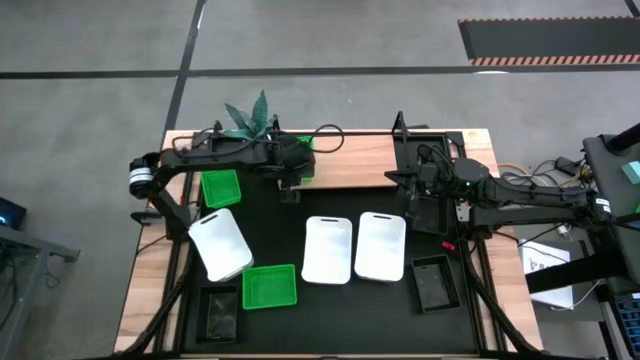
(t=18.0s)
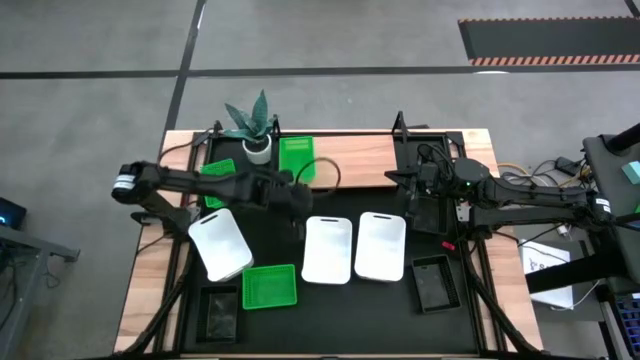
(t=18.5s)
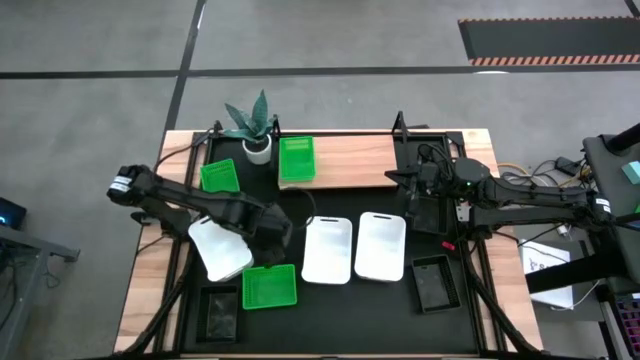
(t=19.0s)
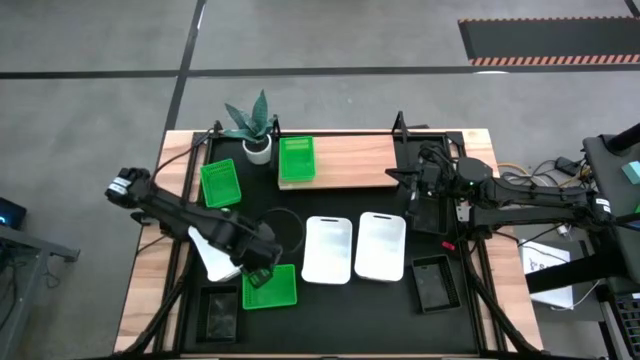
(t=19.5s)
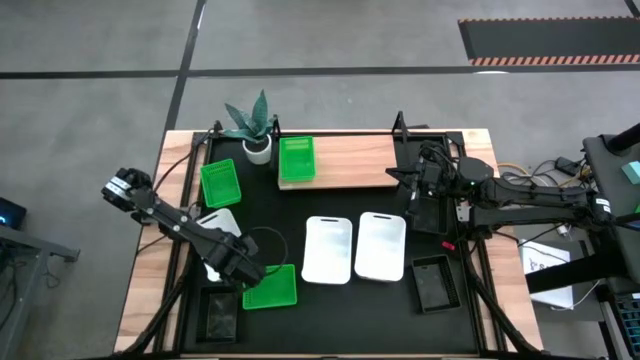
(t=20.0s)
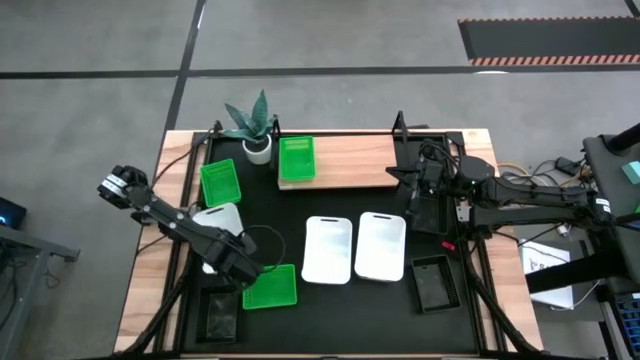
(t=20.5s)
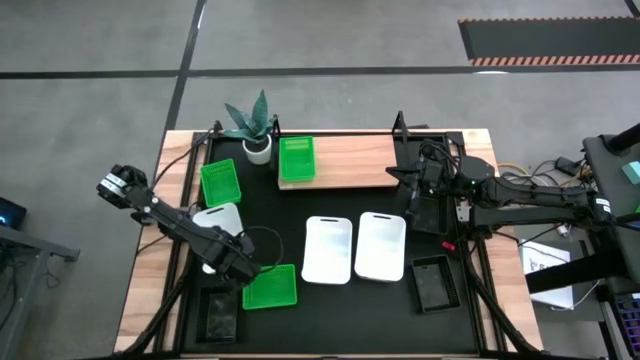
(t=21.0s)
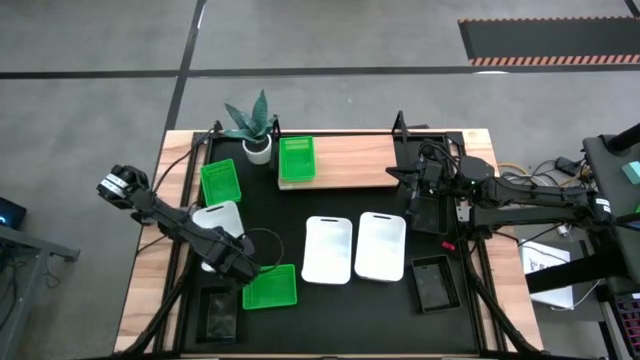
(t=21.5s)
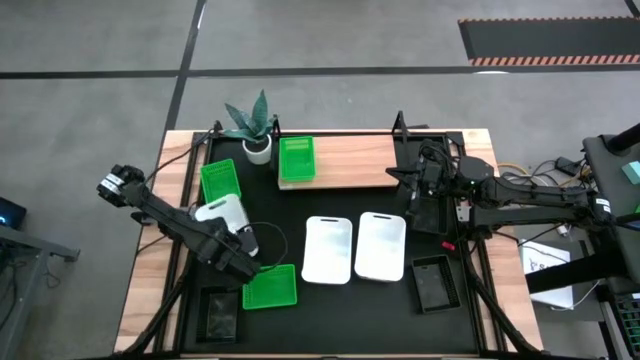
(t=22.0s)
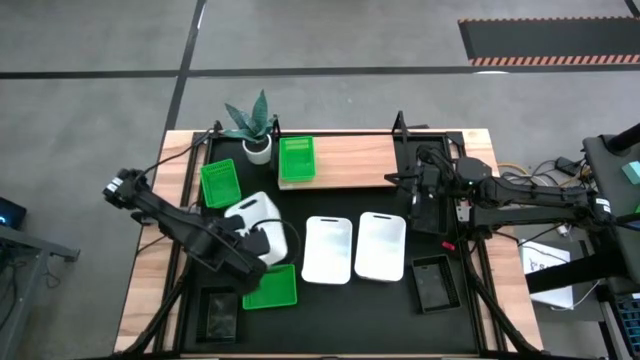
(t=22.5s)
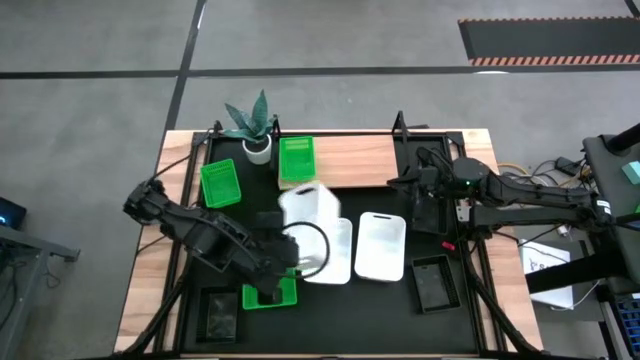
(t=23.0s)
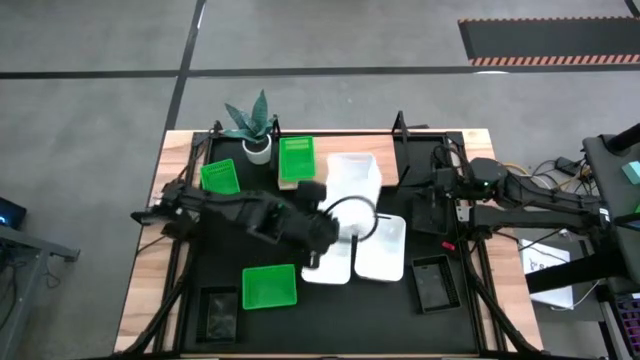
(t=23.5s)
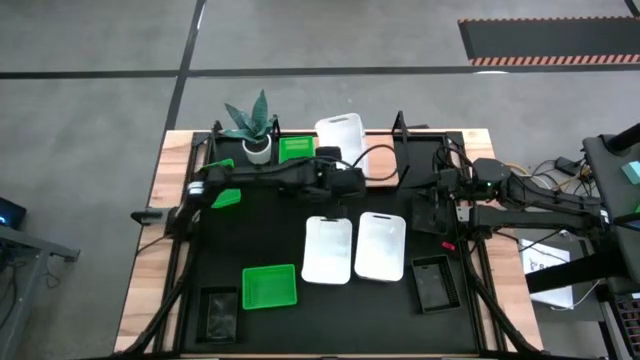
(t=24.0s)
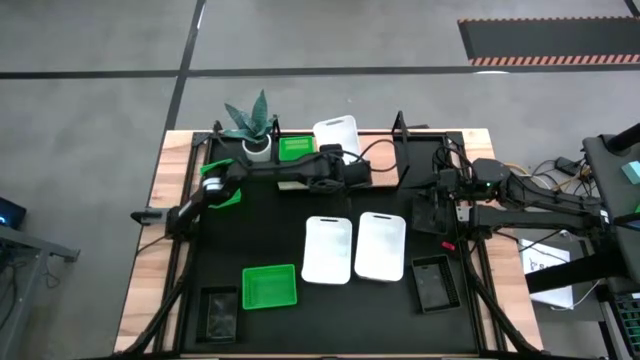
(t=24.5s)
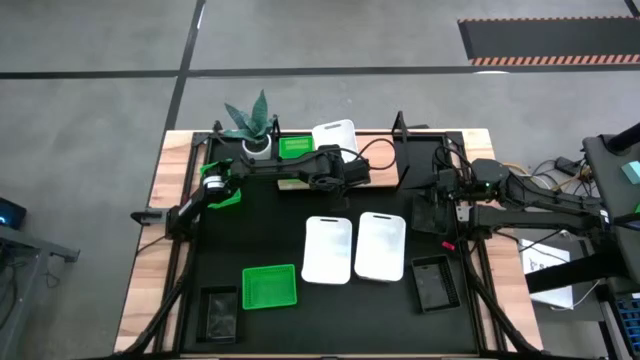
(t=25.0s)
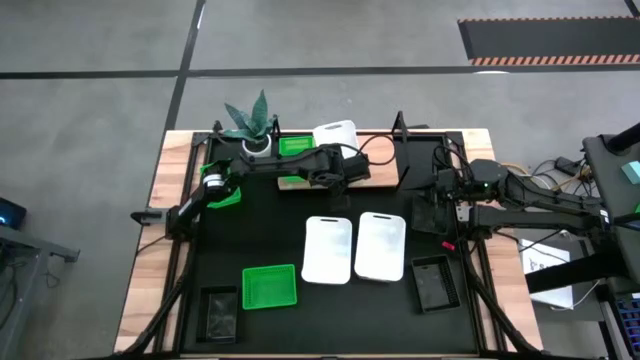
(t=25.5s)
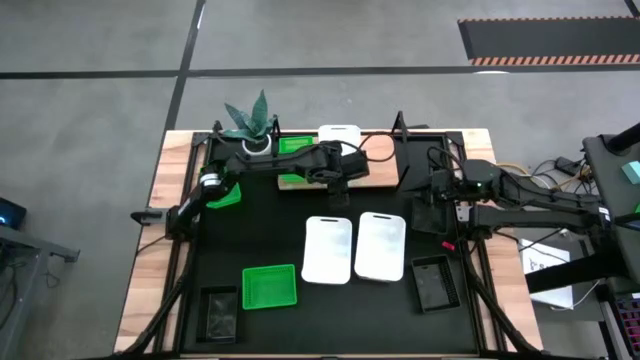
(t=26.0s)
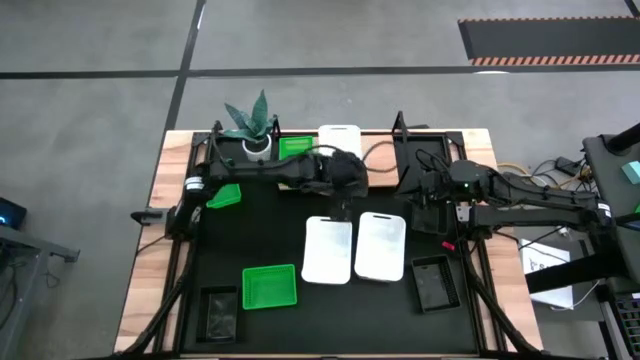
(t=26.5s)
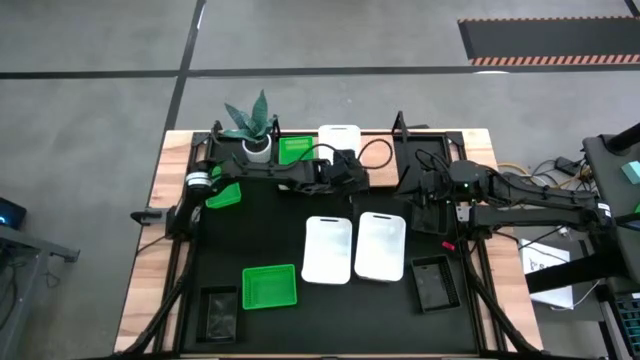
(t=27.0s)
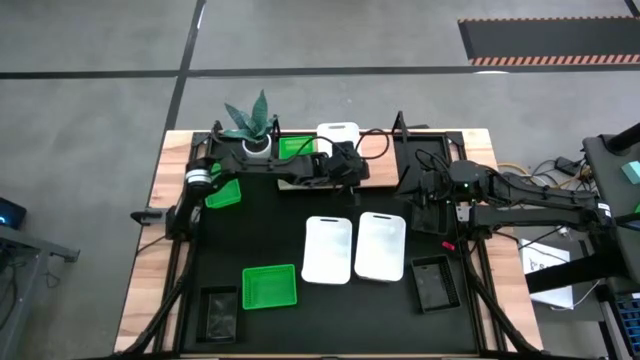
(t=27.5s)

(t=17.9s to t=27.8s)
Task: Stack baskets on shelf by color
Put the left white bin on the shelf

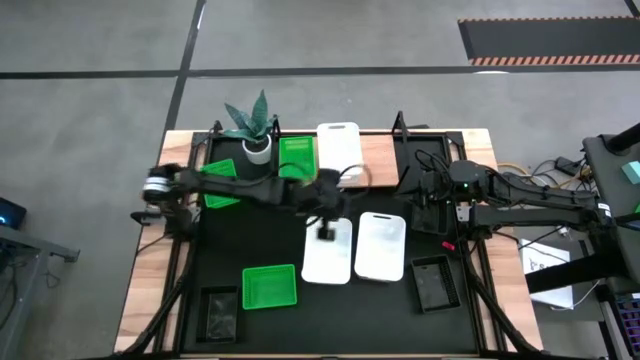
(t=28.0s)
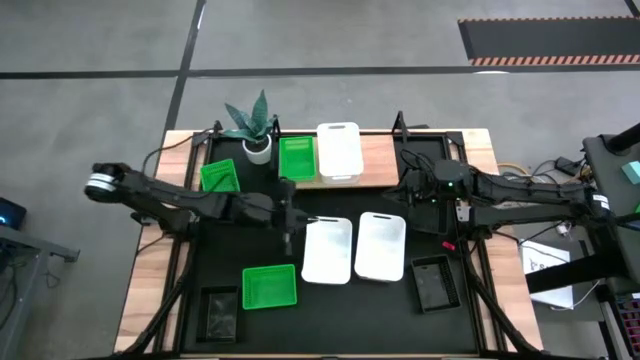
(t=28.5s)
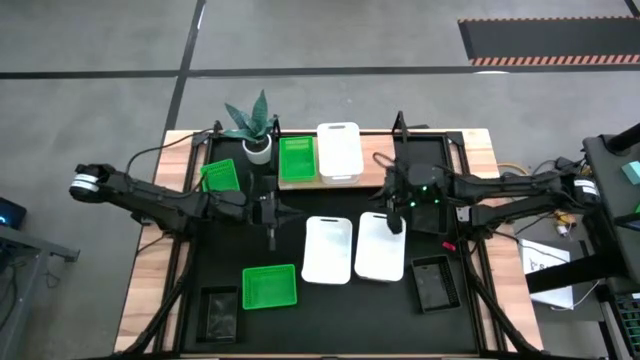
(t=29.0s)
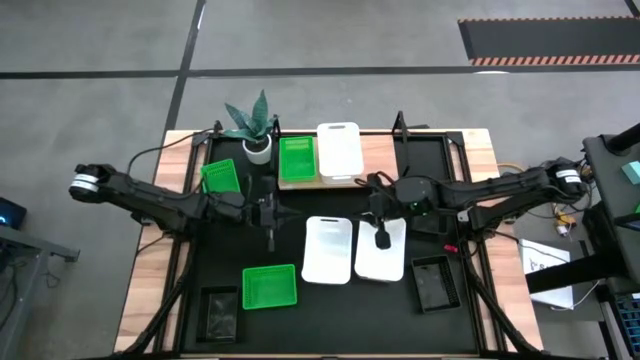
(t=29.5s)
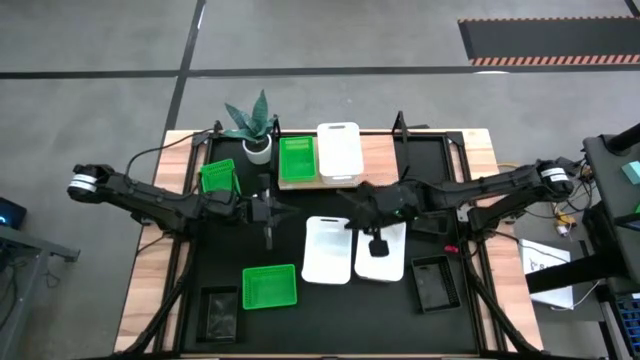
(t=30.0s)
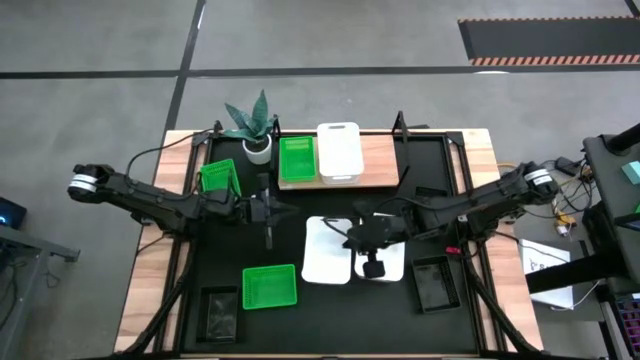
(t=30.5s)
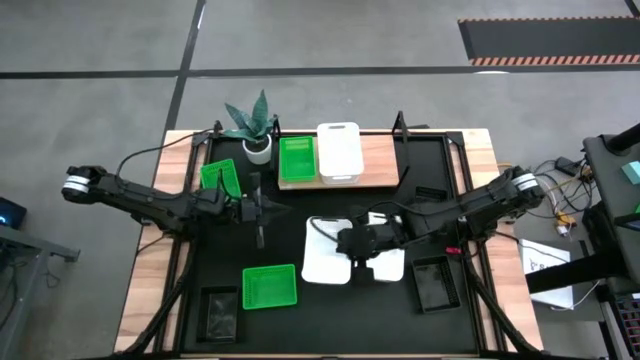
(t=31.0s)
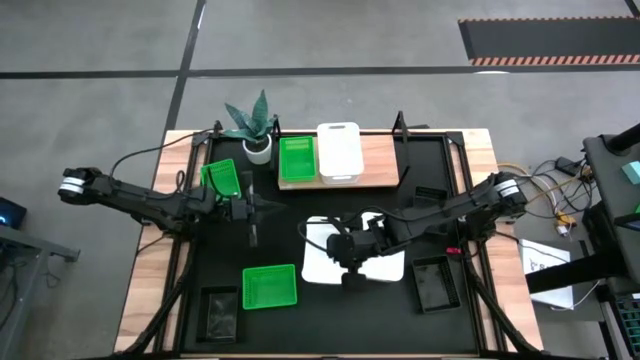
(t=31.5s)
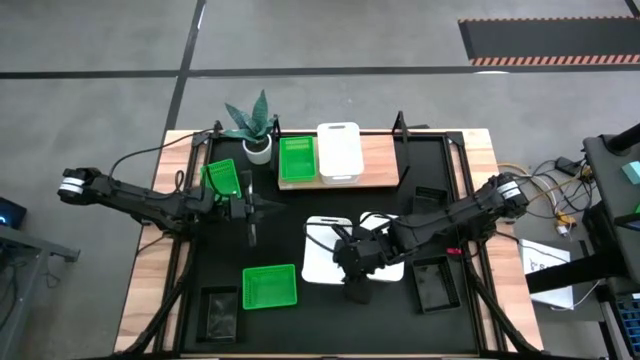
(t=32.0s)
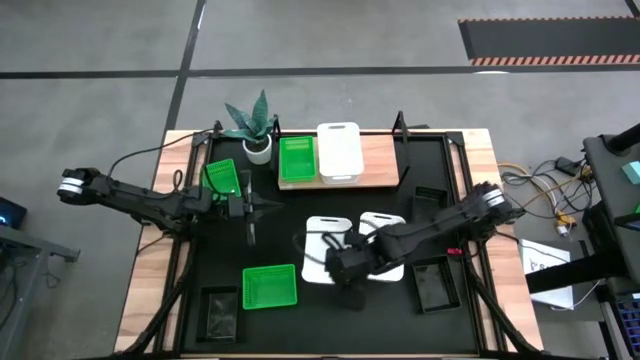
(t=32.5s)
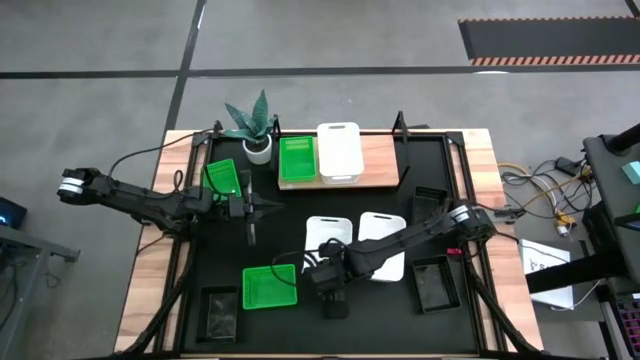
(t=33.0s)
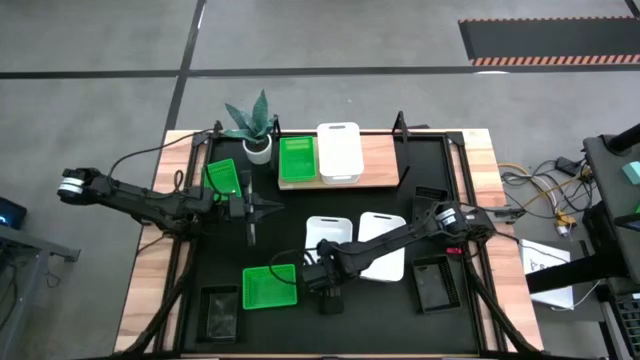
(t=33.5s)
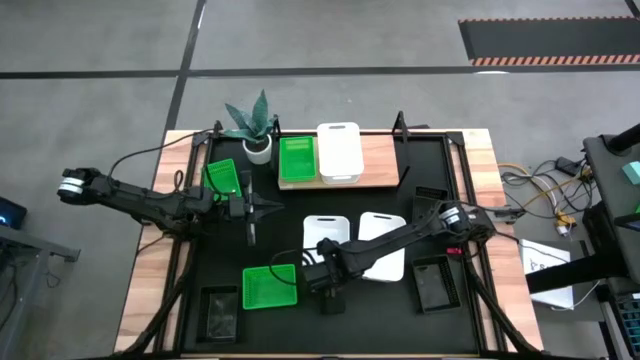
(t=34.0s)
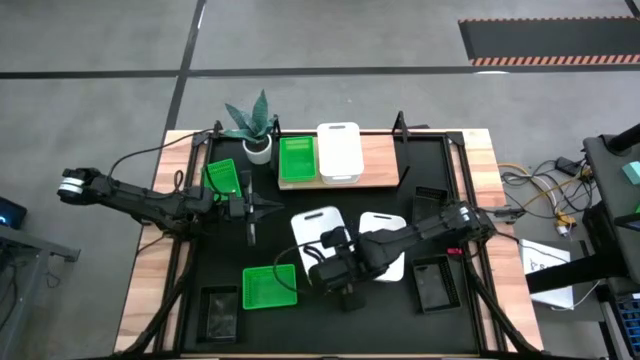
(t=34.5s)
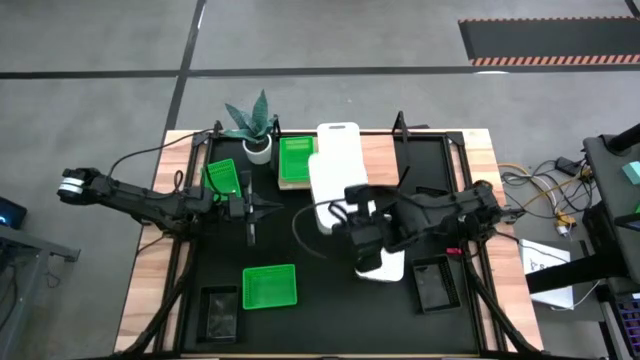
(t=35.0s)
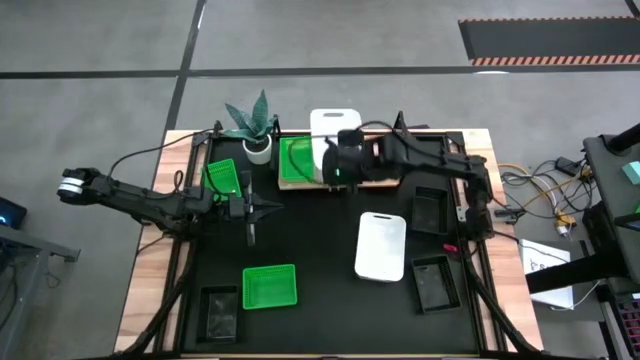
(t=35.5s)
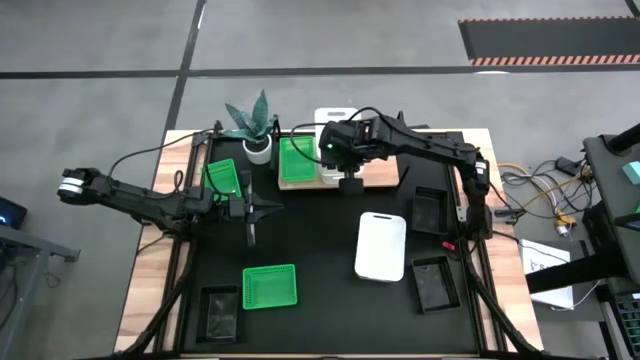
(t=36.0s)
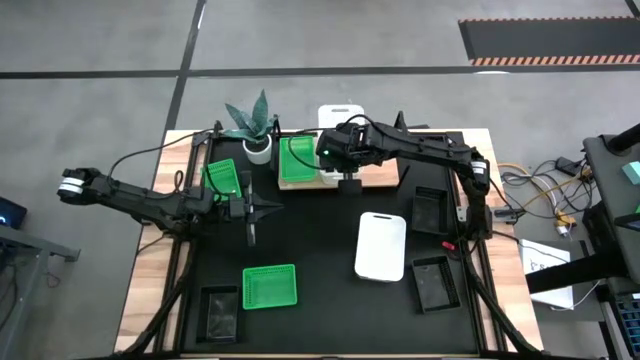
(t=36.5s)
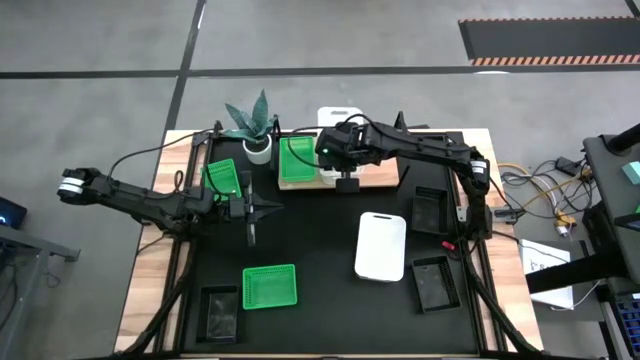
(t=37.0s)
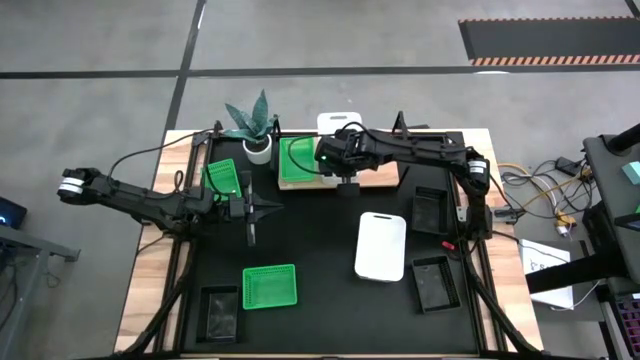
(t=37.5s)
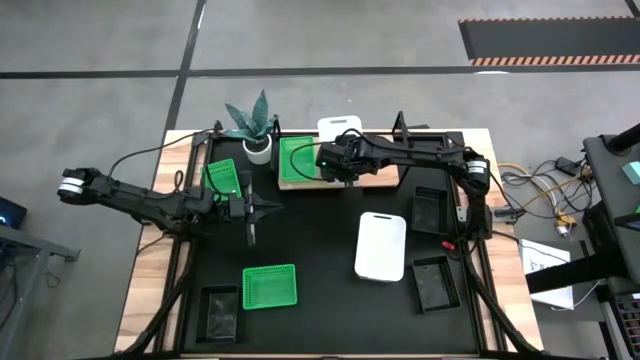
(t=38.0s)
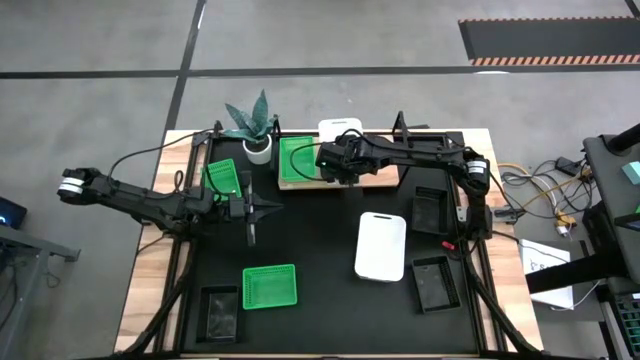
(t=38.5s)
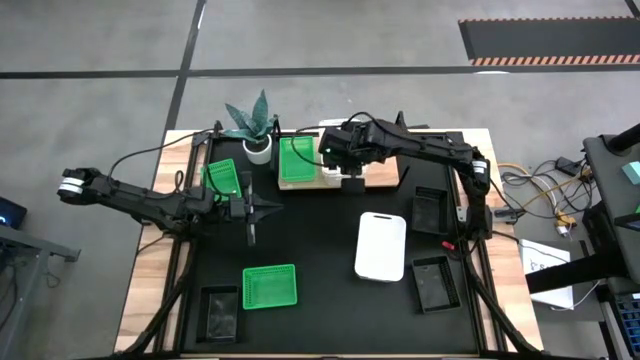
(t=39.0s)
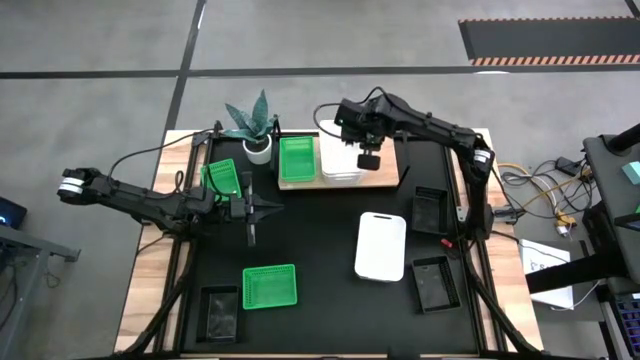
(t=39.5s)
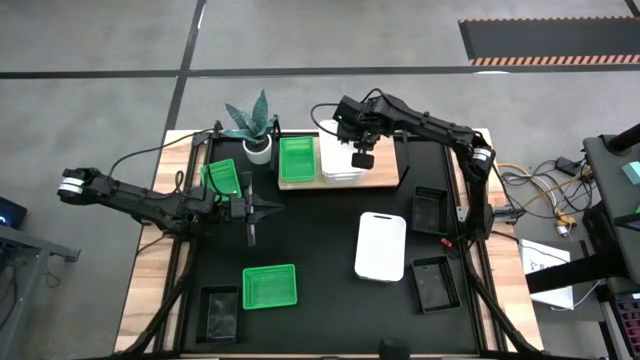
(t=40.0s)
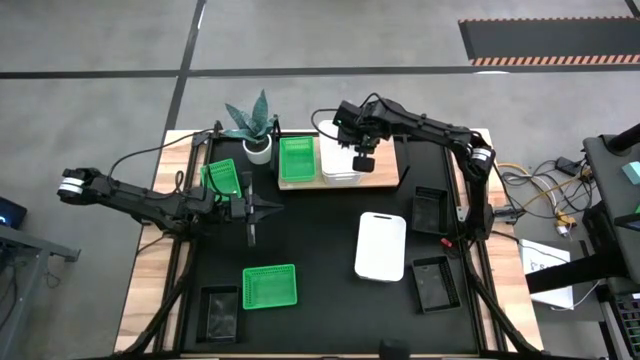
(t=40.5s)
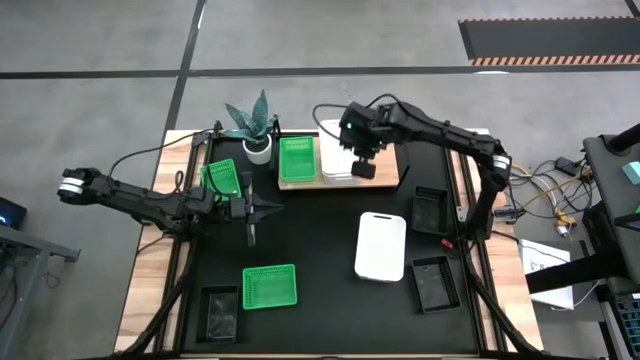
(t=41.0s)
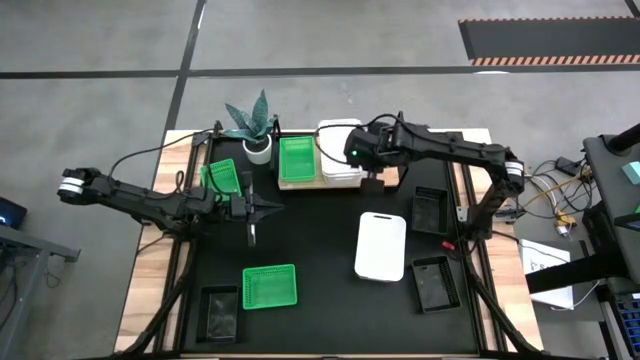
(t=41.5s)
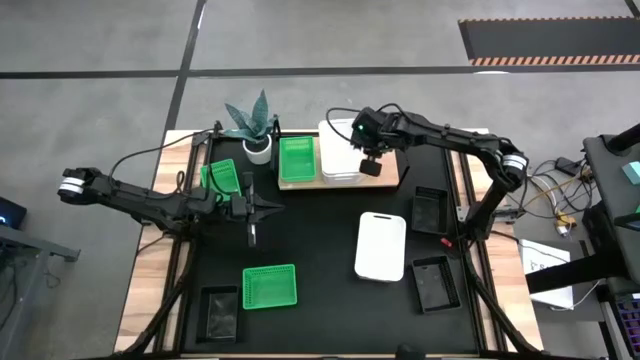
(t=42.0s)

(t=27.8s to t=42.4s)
Stack the left white bin into the white bin on the shelf
